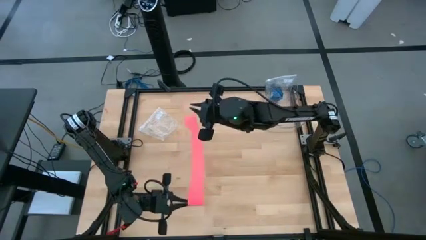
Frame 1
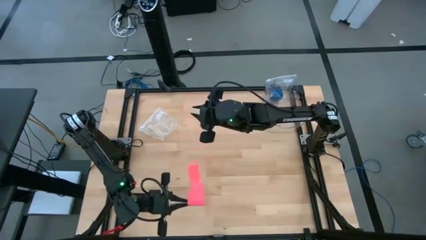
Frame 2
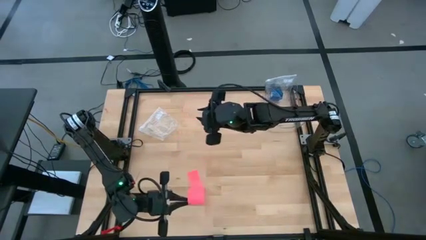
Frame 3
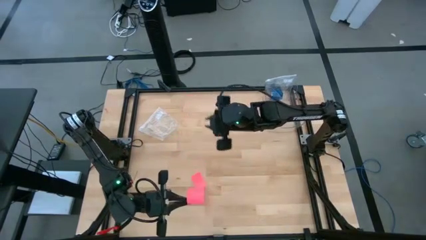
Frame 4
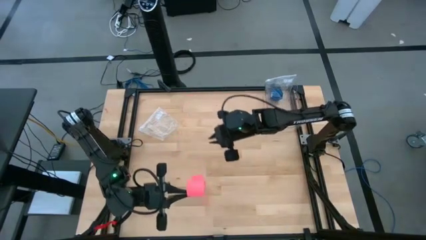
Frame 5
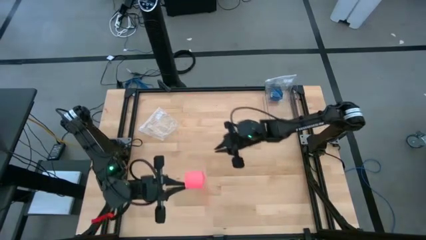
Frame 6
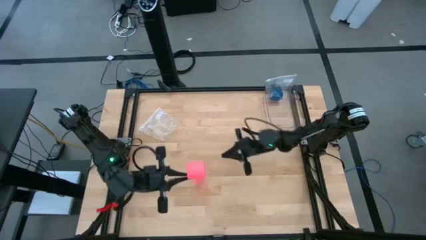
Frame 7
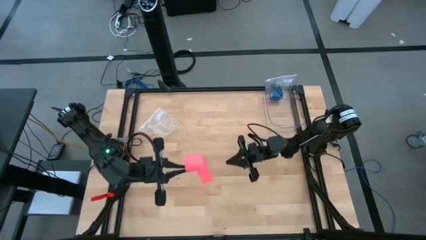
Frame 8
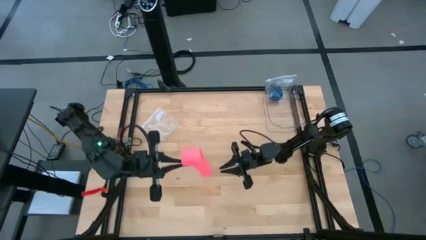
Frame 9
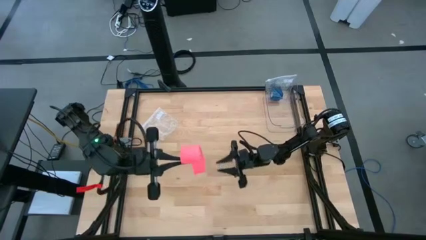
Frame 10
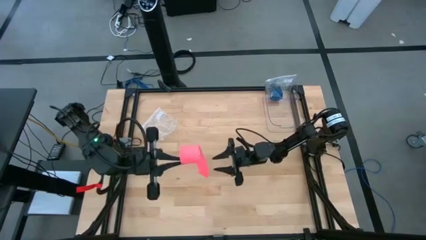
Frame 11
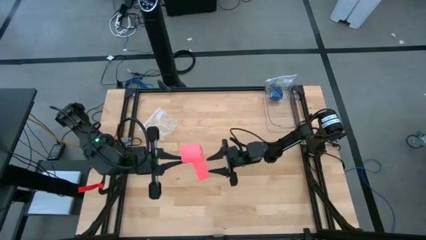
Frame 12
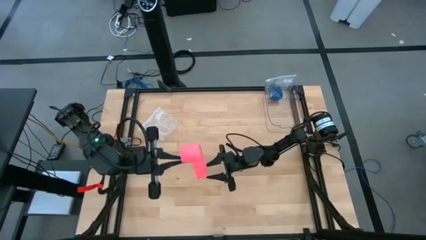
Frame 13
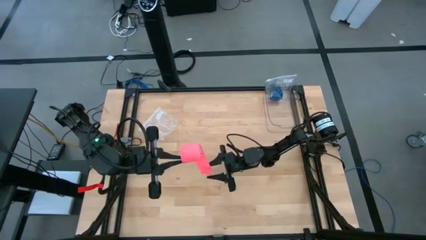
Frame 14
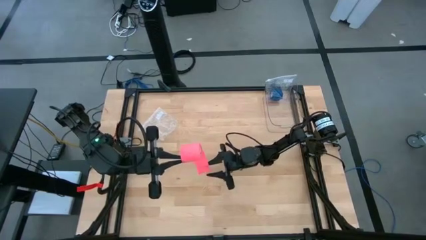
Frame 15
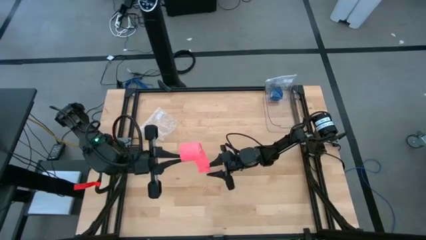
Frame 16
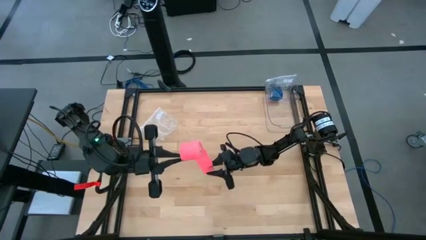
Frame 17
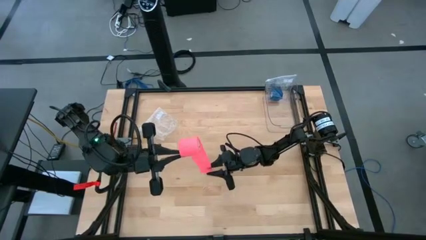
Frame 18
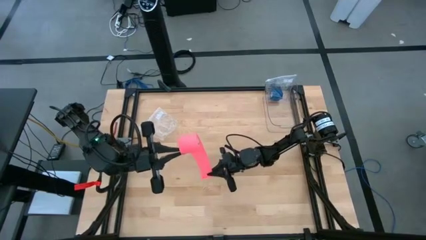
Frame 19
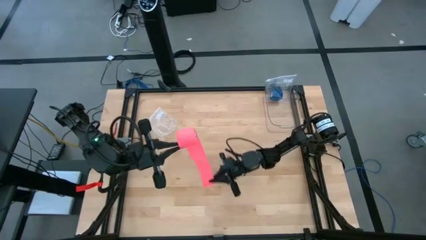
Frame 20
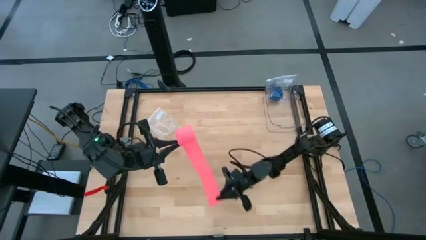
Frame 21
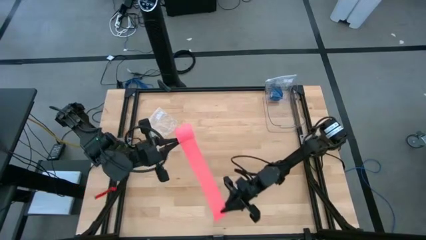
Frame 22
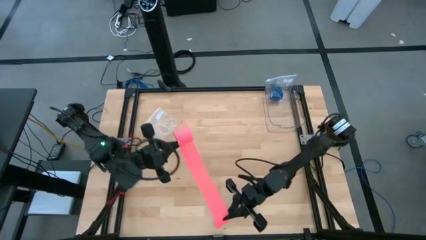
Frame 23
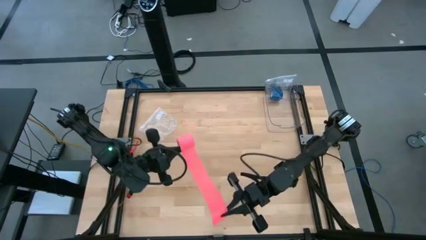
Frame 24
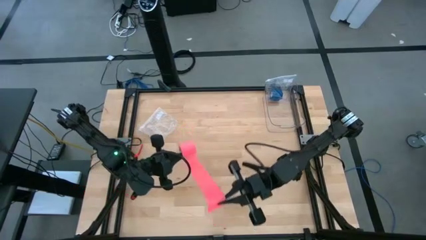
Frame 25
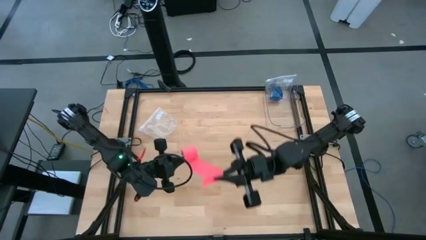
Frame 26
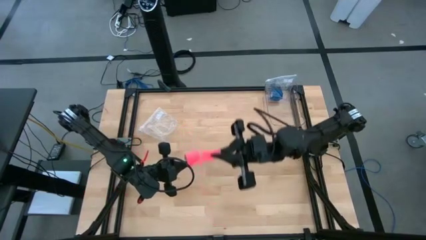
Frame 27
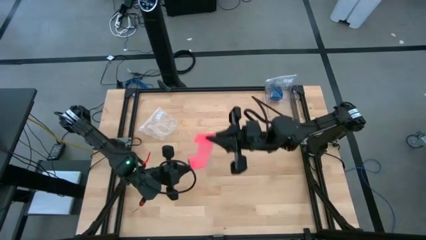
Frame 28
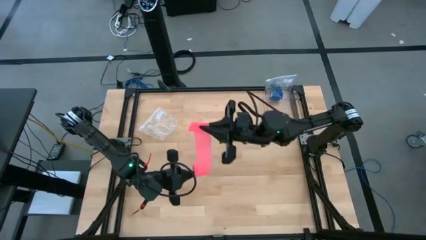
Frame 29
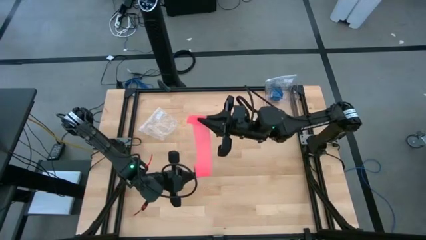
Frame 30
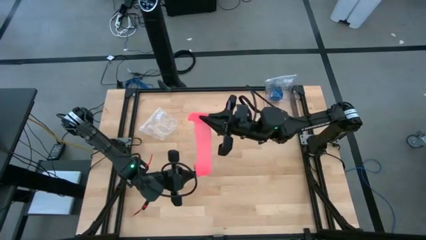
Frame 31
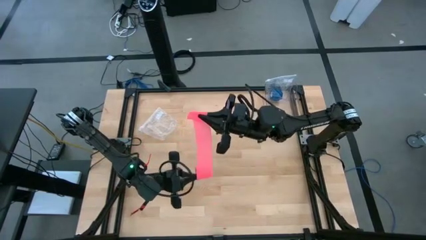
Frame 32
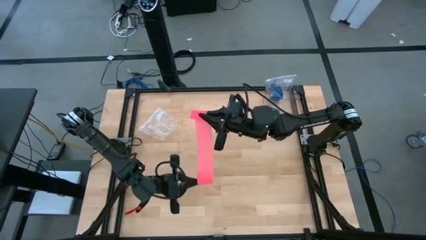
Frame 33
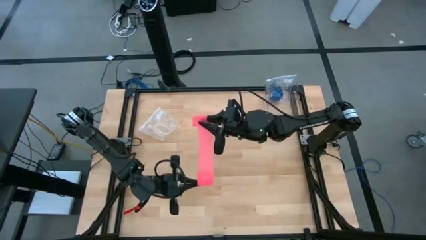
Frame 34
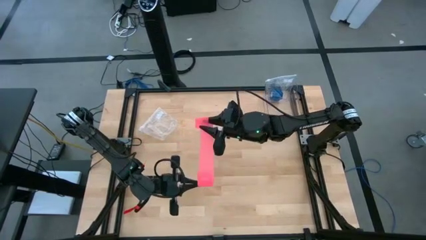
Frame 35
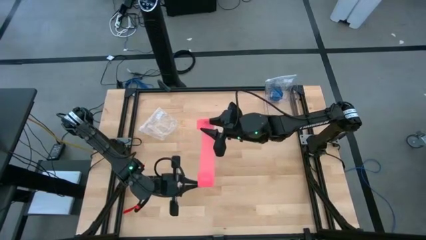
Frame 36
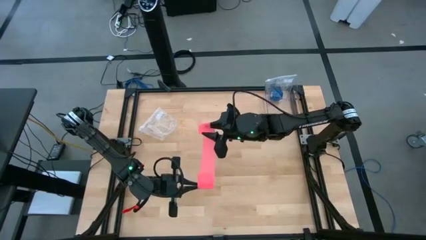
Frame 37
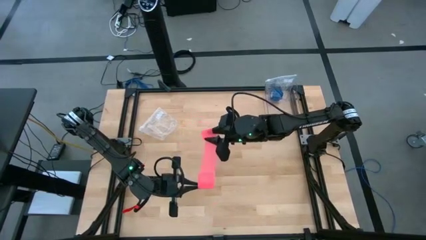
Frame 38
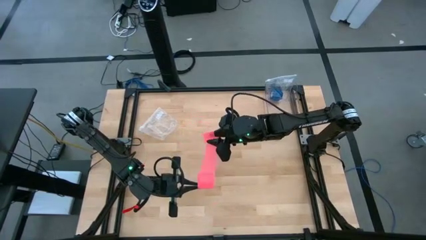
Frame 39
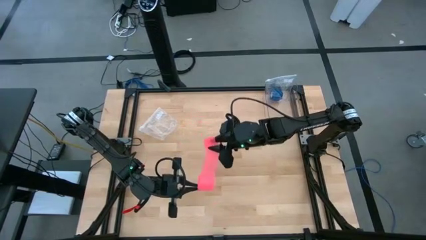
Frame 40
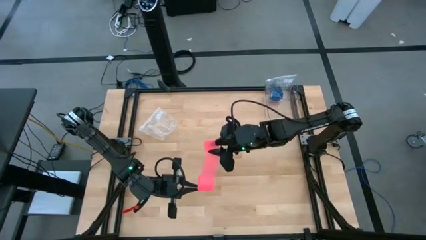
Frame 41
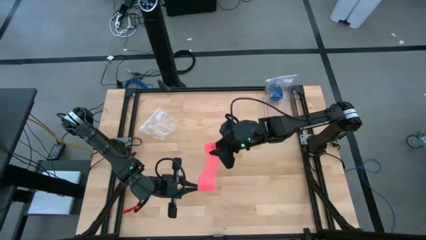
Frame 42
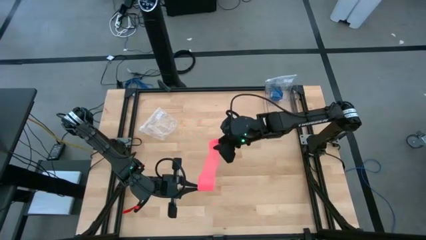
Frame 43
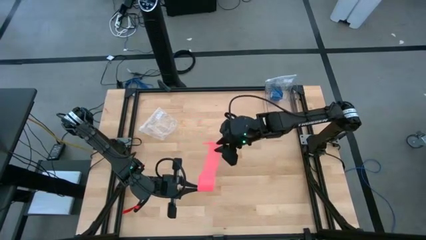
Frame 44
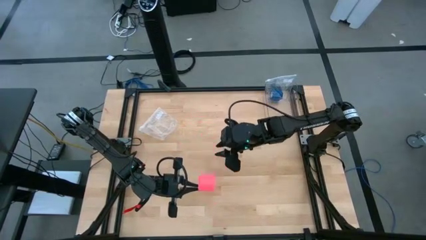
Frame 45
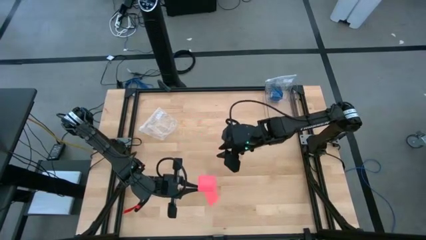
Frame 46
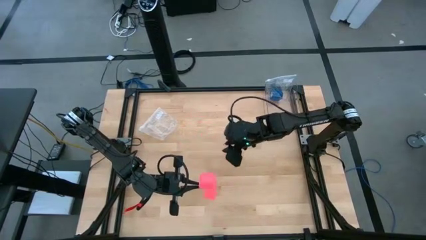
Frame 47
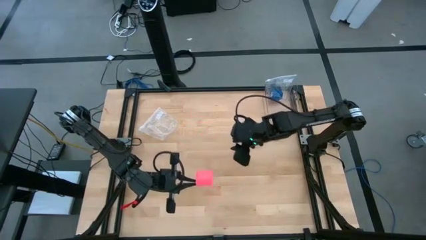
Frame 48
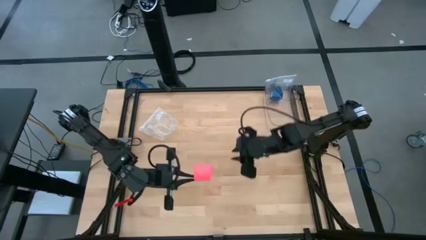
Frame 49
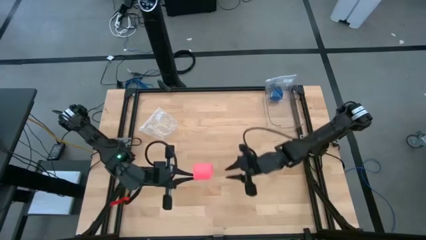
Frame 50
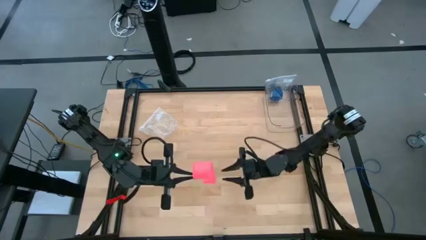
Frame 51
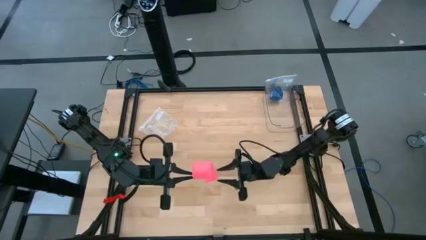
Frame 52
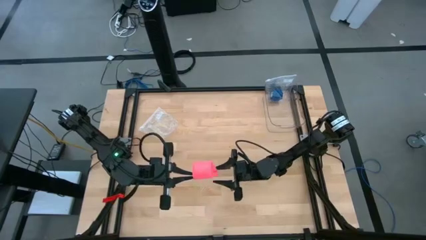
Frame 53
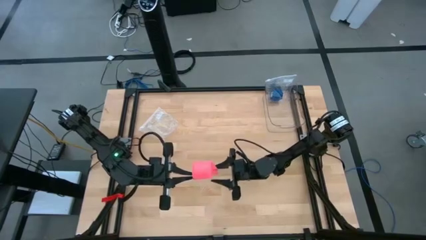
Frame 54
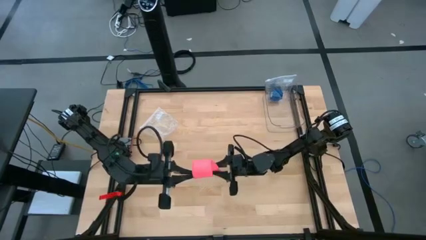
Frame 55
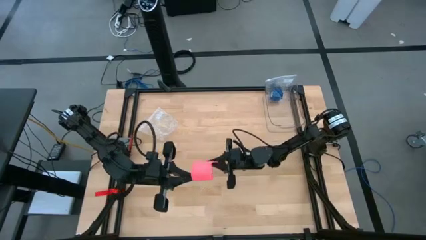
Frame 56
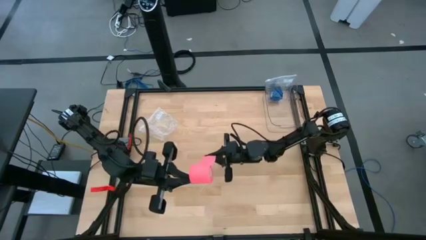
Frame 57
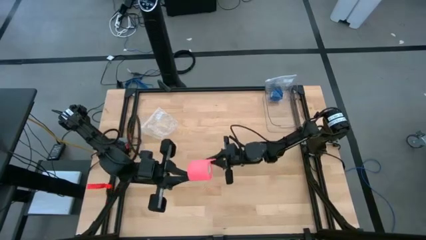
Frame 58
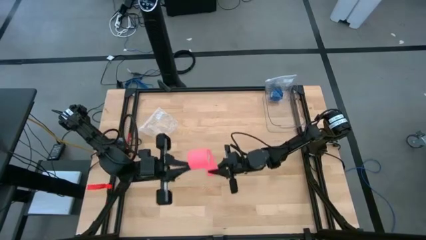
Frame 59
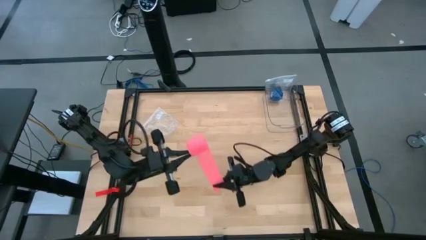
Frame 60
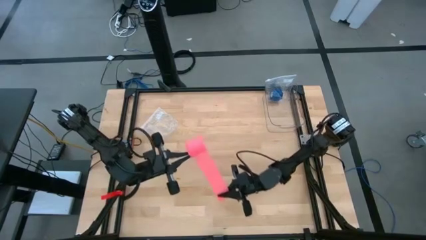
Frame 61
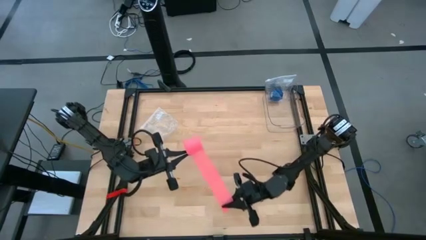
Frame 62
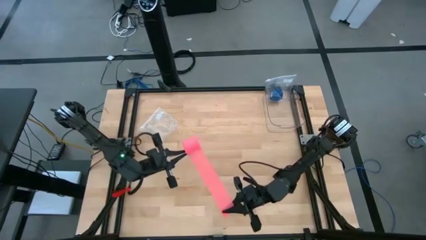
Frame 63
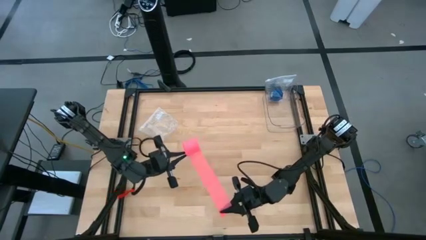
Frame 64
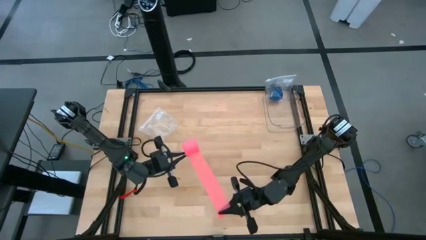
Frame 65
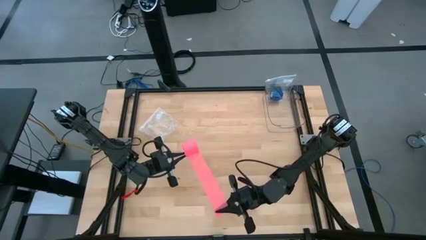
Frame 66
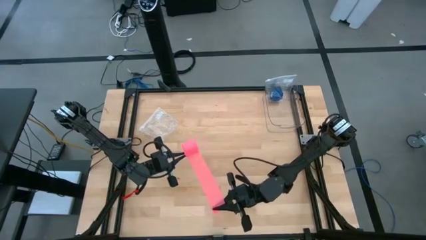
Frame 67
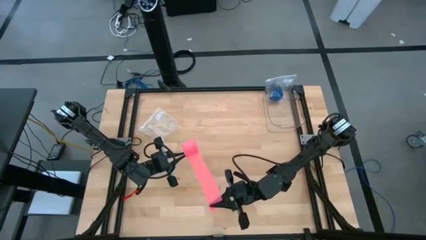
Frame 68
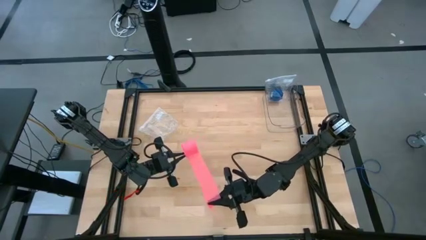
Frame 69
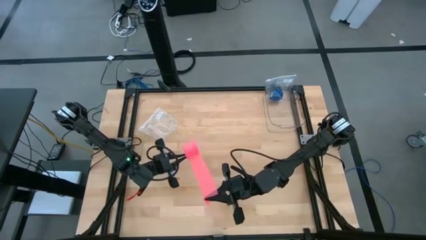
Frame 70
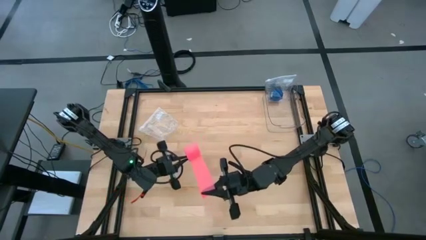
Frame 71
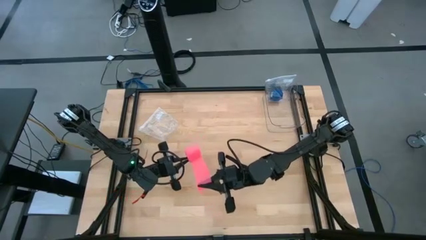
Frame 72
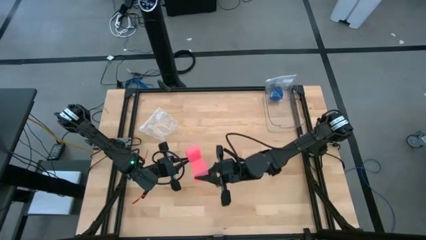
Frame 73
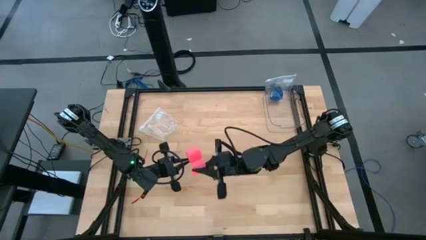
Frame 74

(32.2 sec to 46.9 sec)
Task: Roll bandage
Roll the pink bandage
